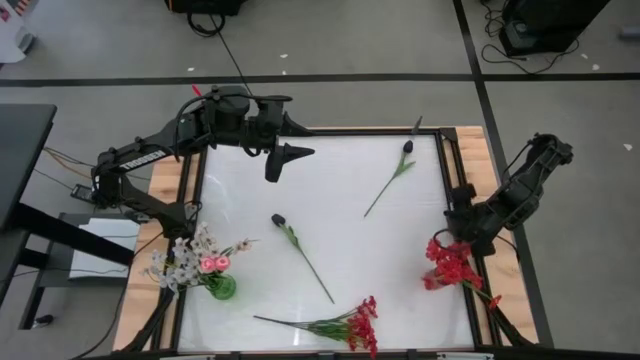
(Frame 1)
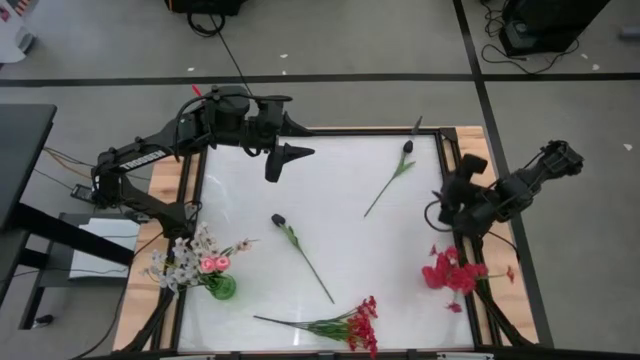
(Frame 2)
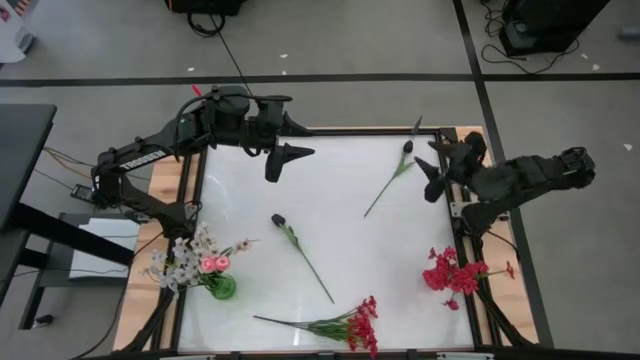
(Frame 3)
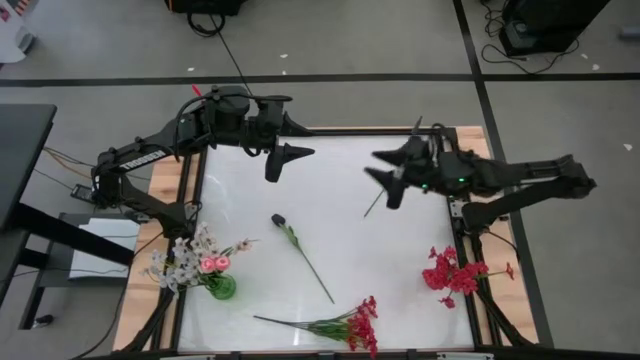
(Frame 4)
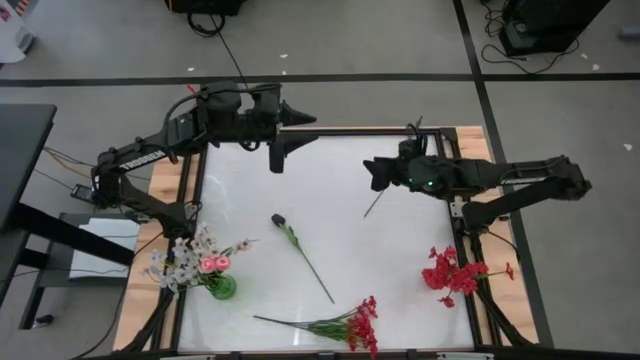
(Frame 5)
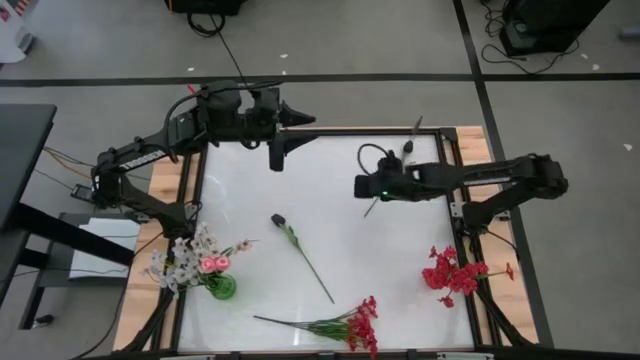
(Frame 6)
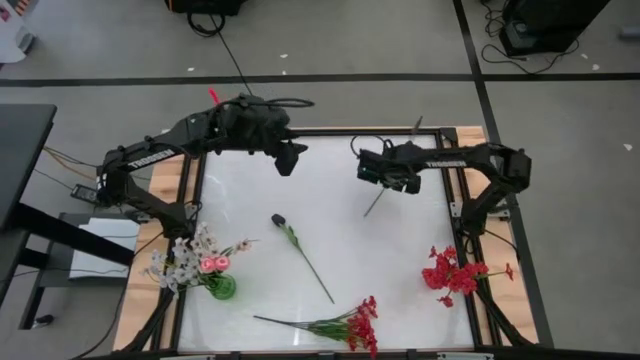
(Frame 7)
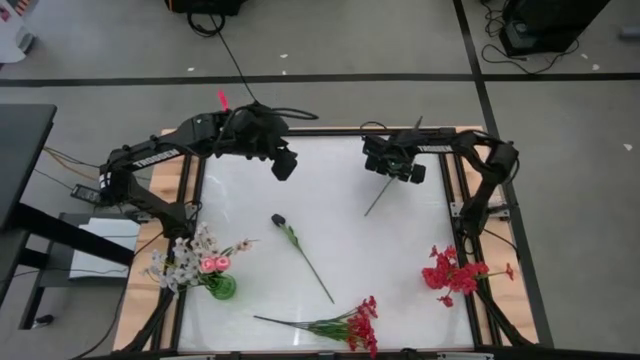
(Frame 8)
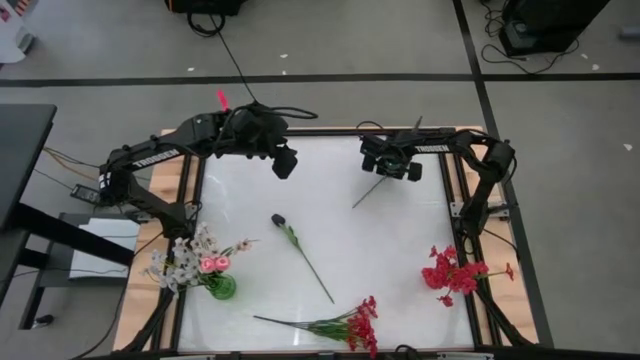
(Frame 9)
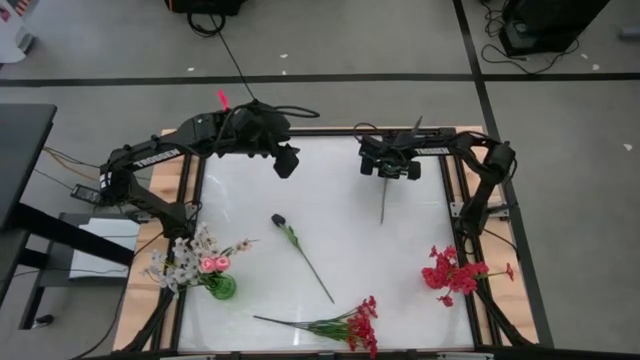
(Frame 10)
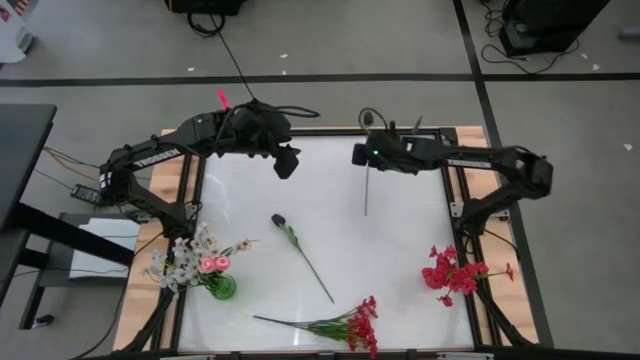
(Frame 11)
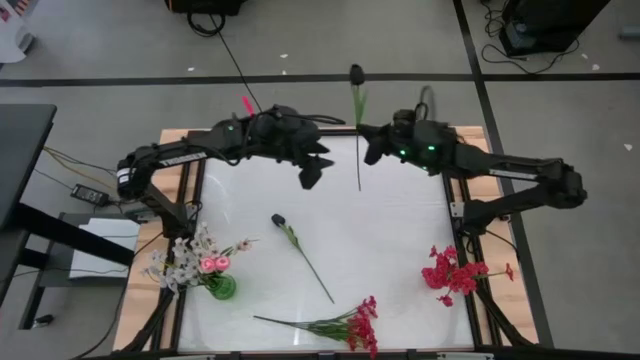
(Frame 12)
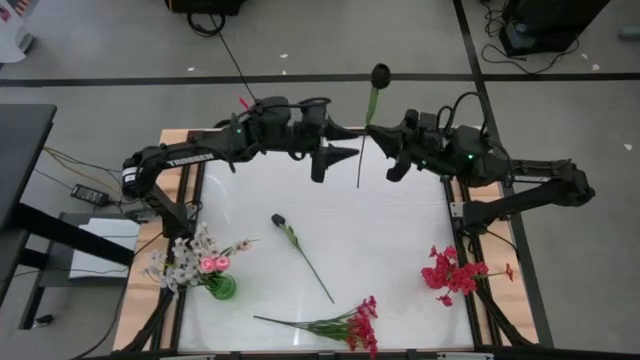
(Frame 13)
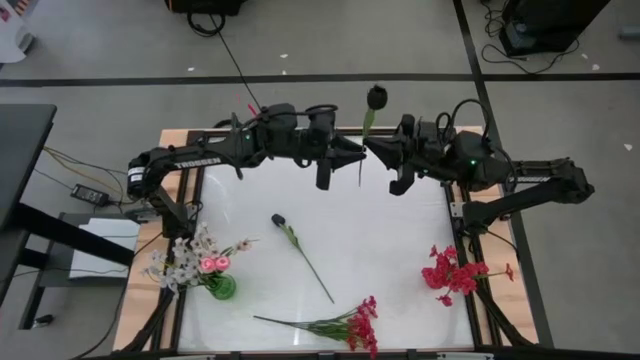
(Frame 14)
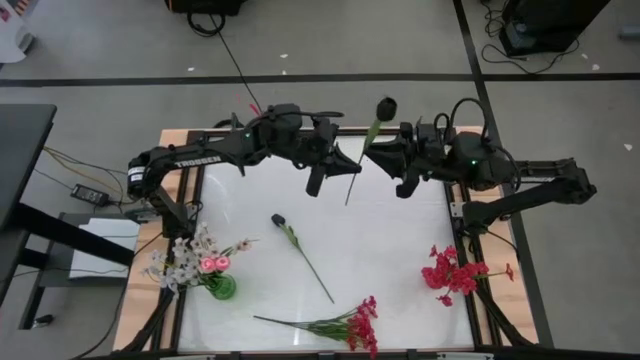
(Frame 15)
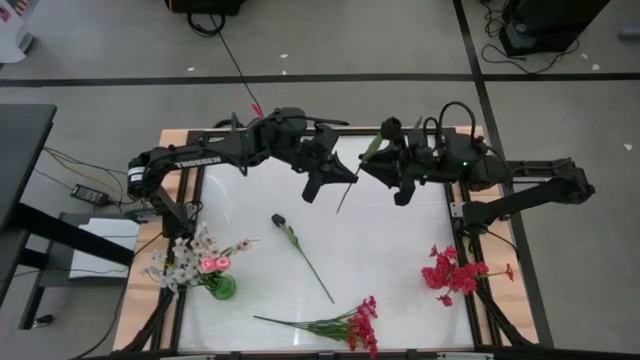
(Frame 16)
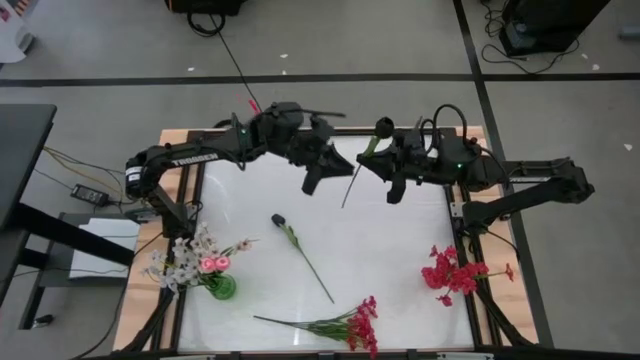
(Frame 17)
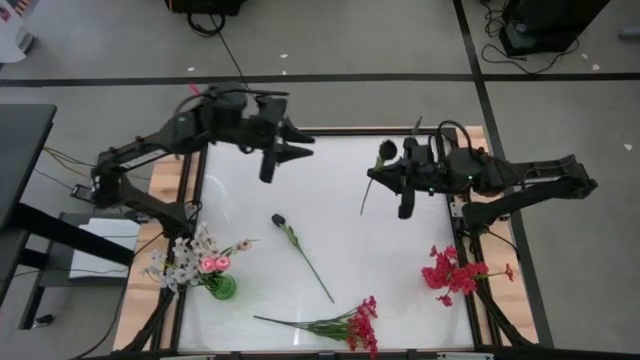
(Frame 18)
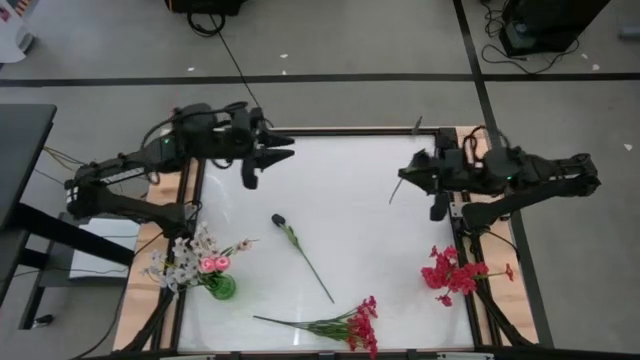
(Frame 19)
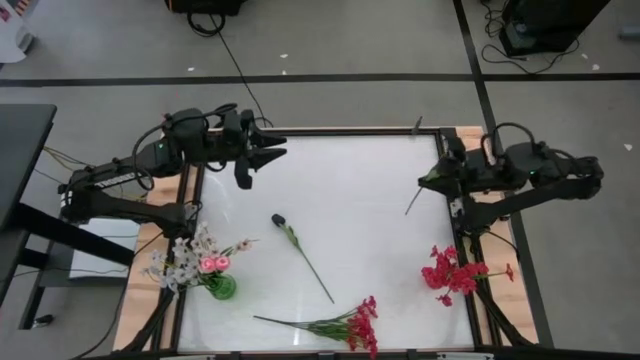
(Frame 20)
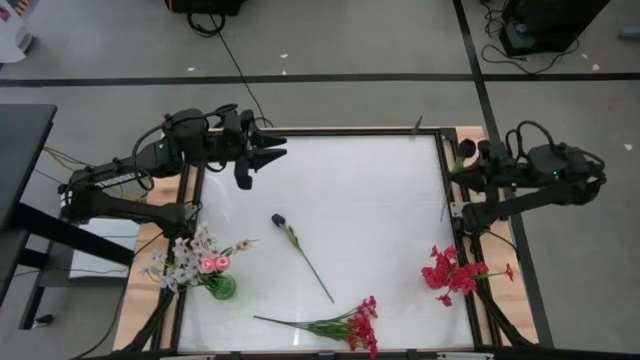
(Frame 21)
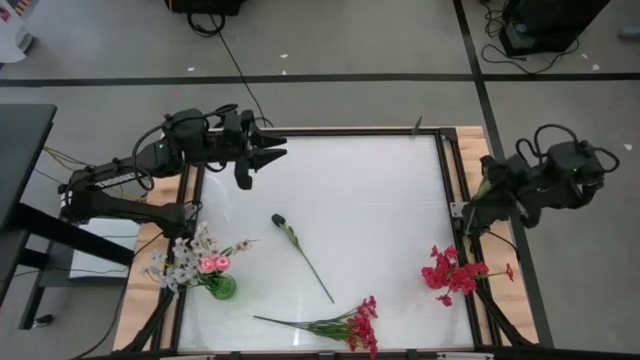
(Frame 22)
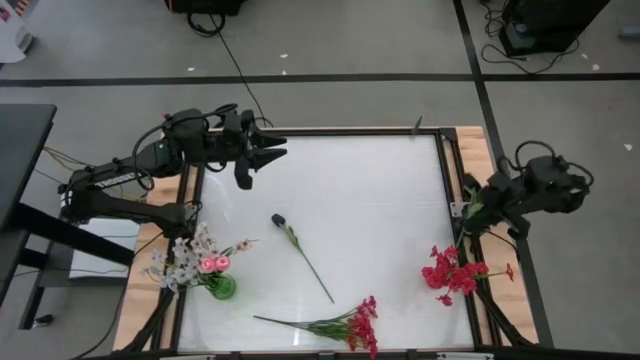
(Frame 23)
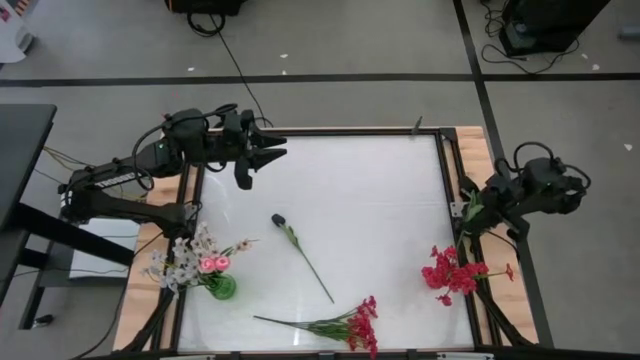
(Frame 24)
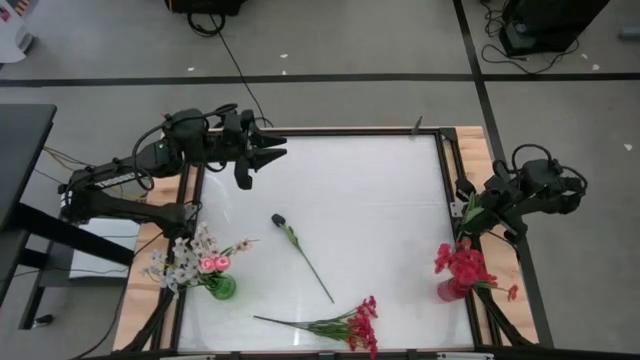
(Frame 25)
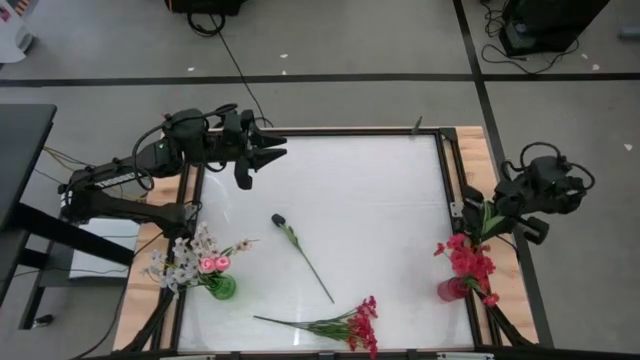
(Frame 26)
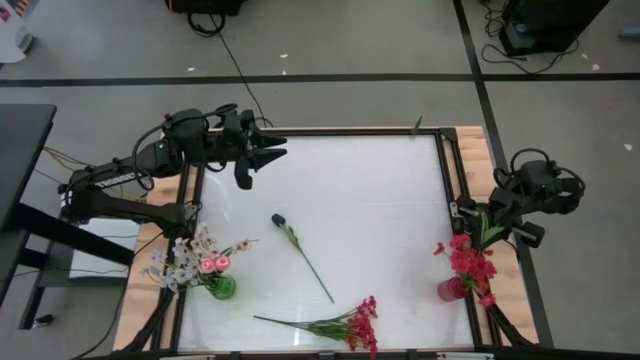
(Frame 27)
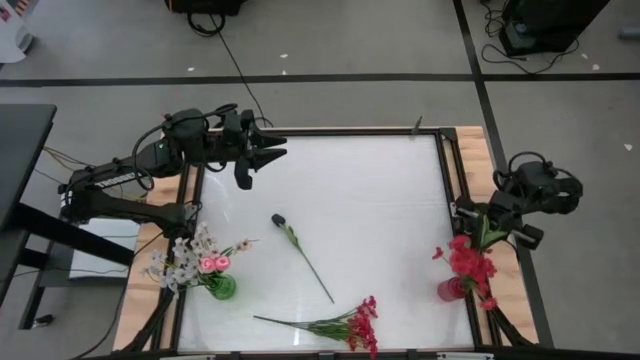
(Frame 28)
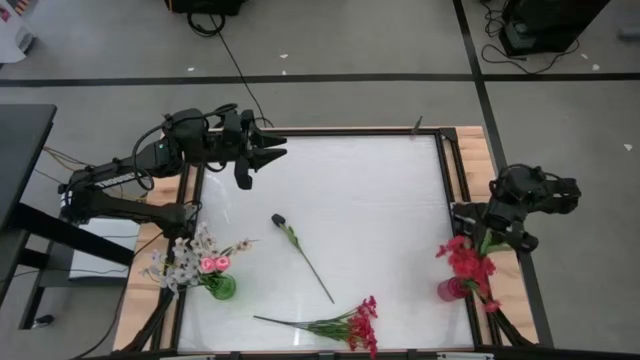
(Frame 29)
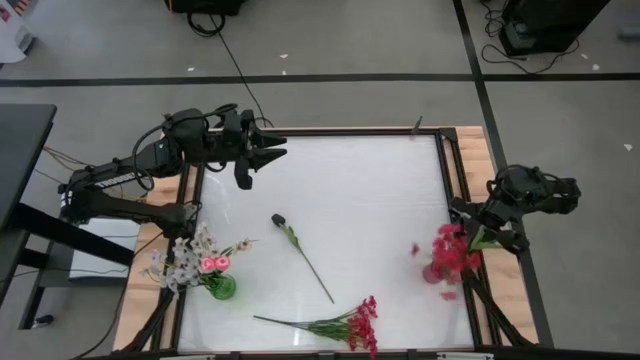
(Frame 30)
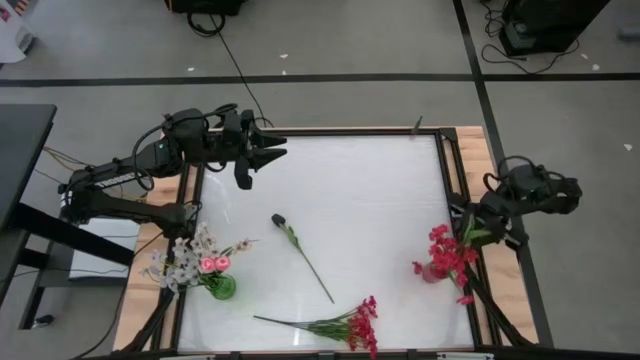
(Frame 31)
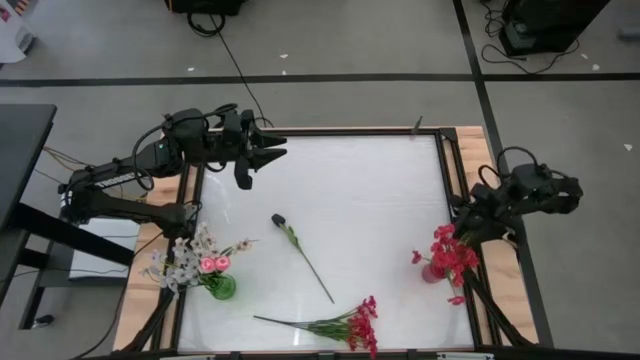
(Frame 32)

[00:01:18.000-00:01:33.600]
Task: Sort flowers into vase by color
Put the top black flower into the red vase

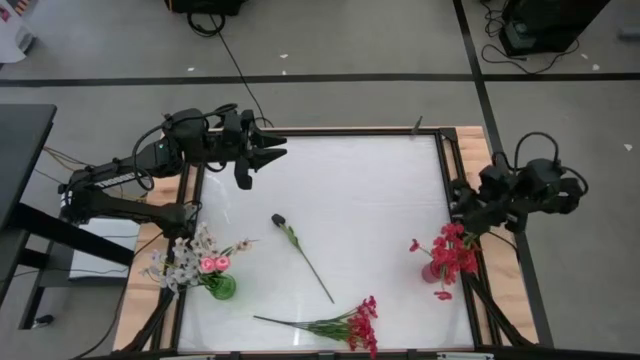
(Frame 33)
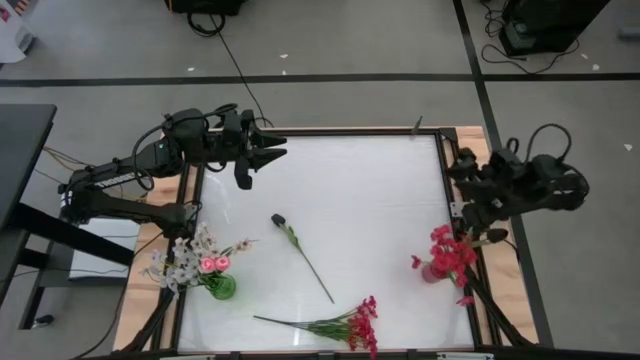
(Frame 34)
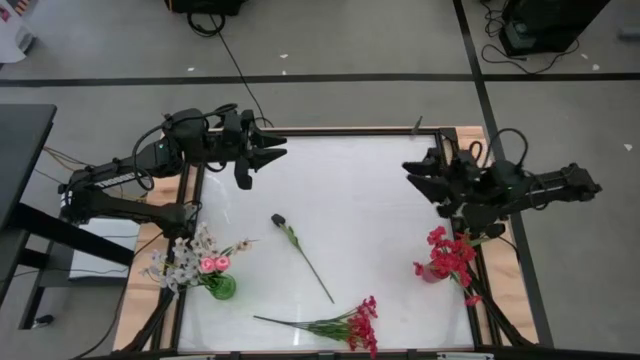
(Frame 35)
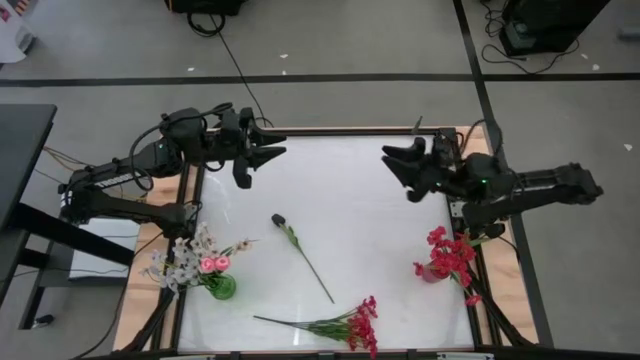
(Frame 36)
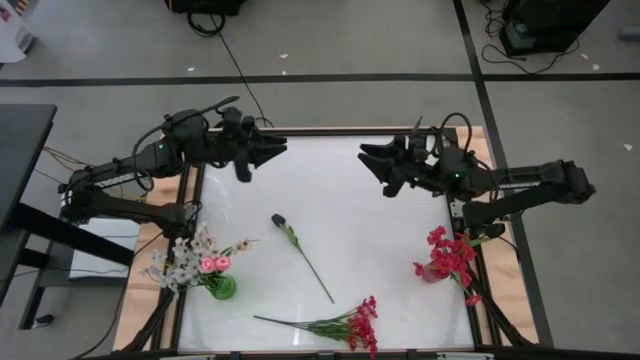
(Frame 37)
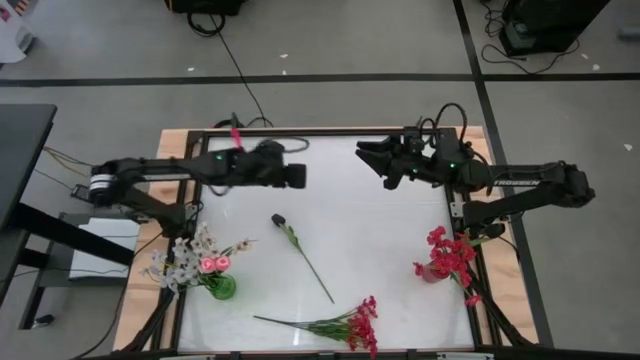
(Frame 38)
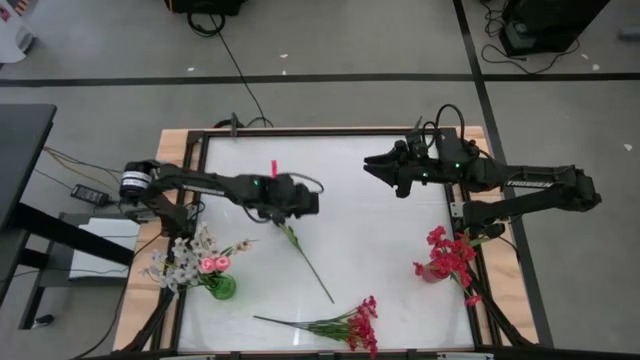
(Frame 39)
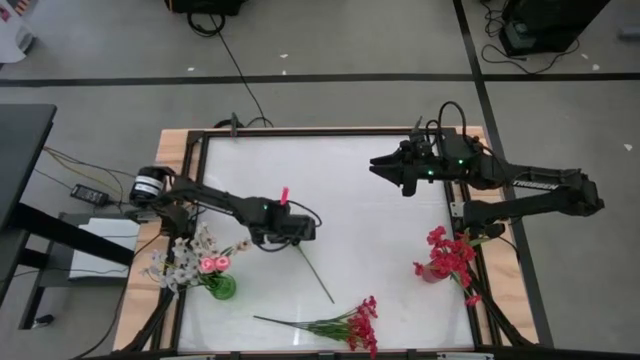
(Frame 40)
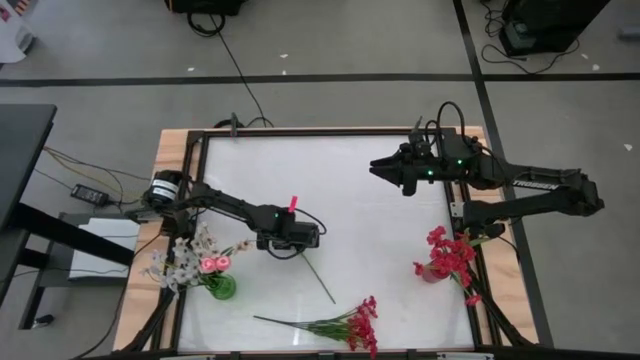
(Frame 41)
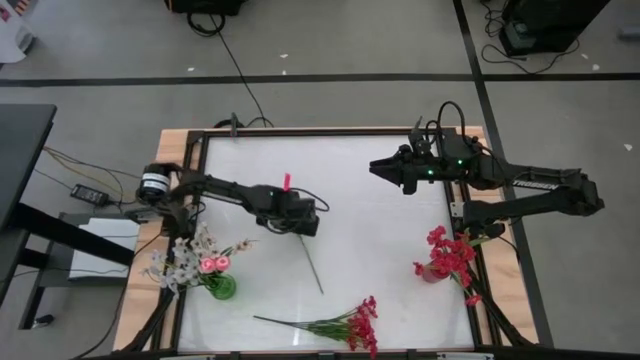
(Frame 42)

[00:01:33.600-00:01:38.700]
Put the black flower into the red vase

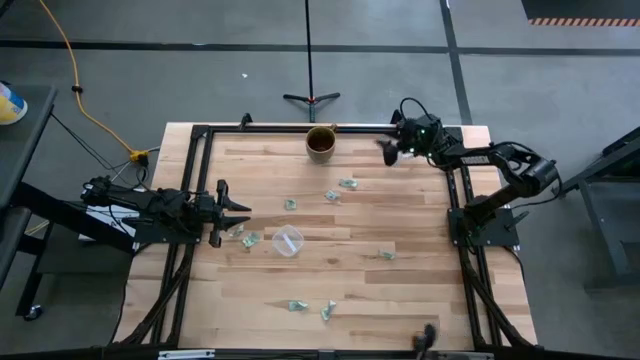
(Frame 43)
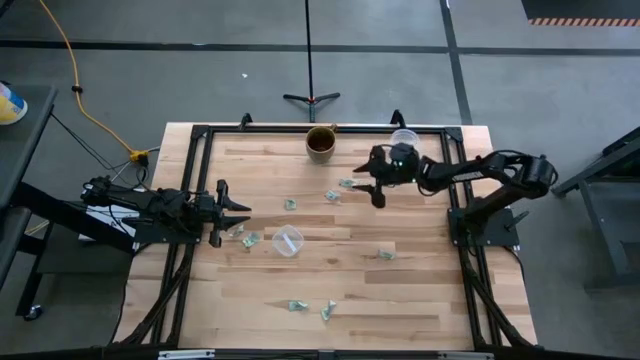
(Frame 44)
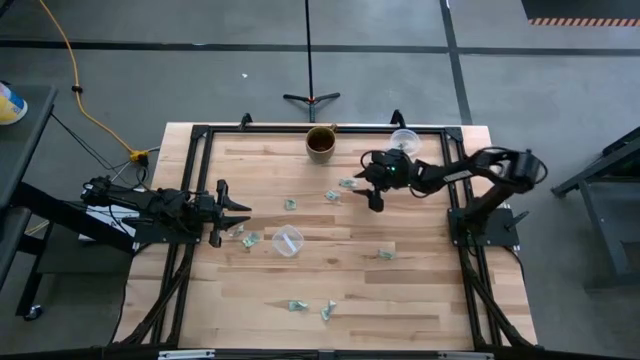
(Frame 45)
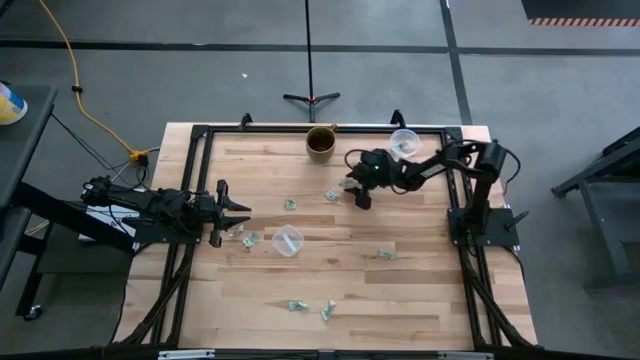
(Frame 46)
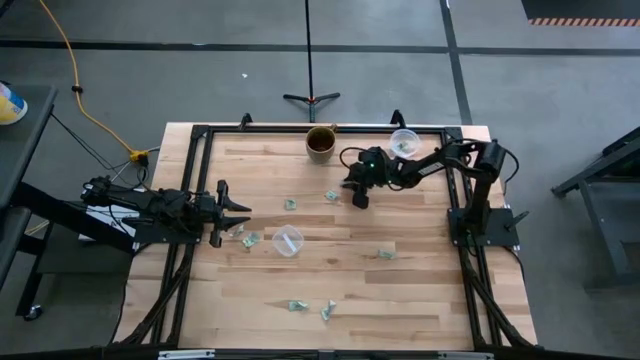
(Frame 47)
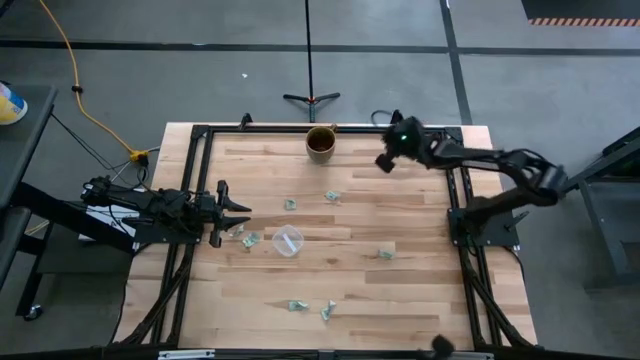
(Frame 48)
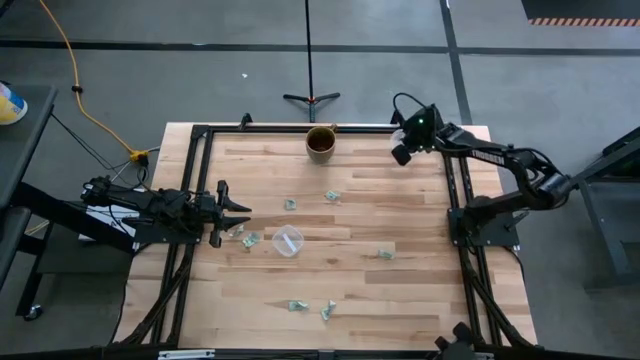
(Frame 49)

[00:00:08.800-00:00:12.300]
Task: Pick and place items into bin
Put the stevia packet into the top transparent bin
